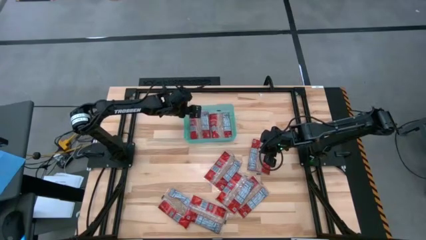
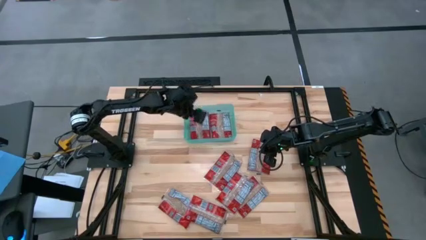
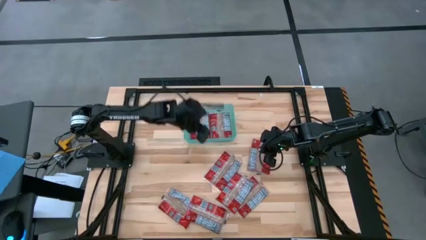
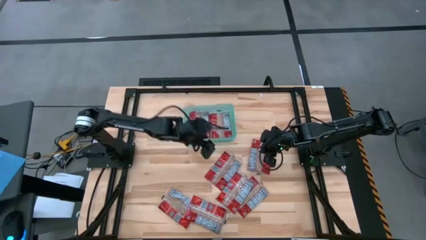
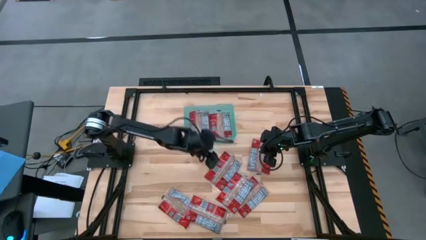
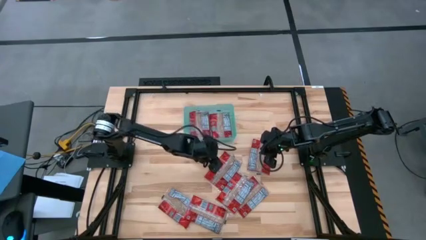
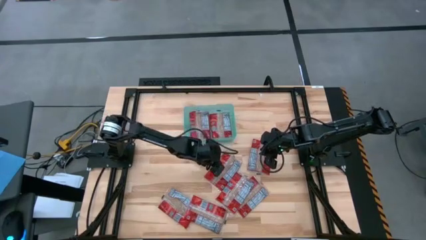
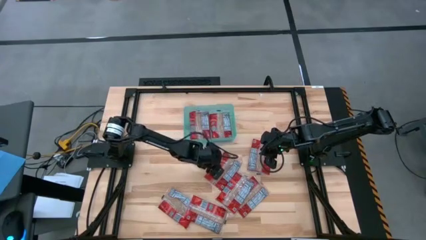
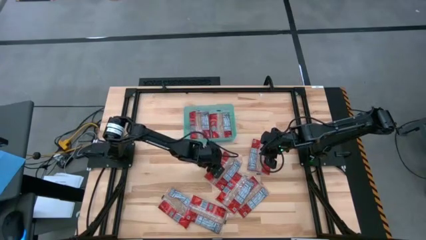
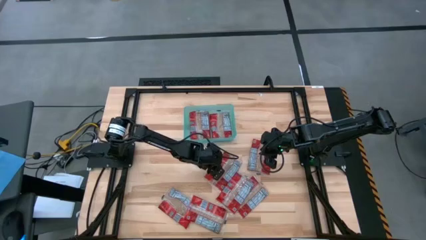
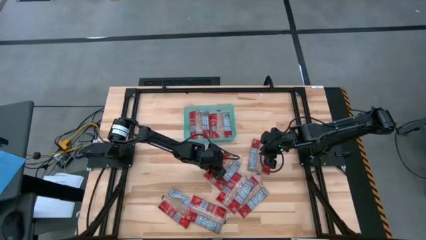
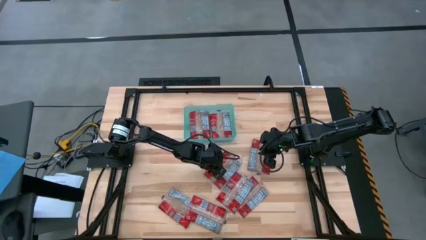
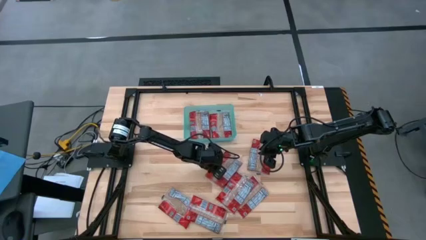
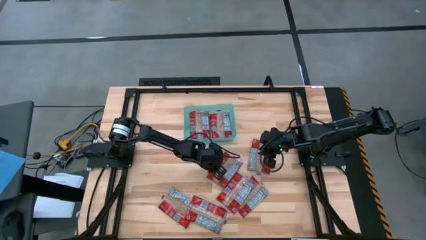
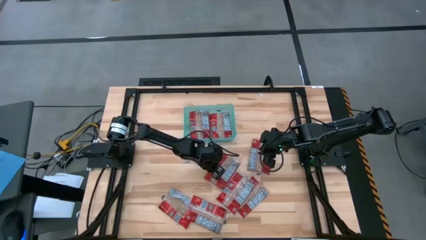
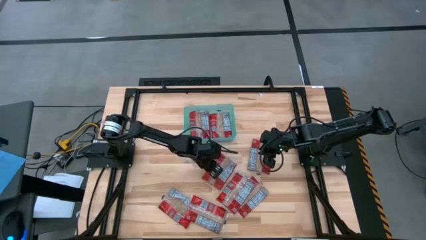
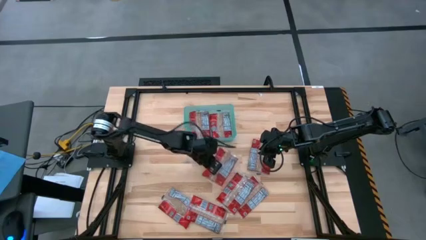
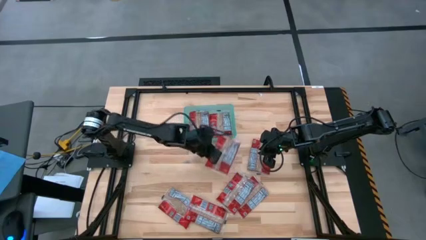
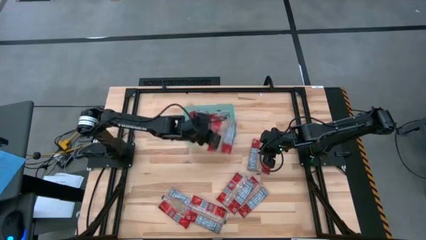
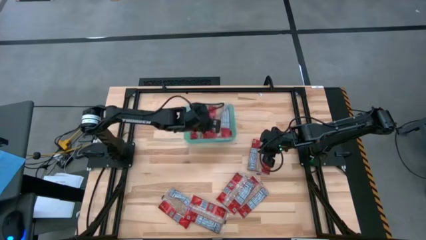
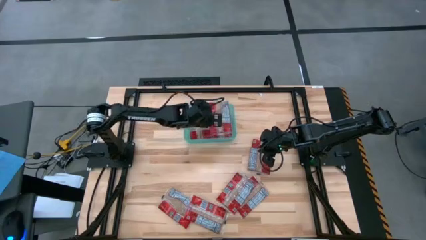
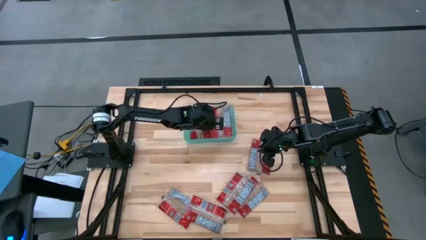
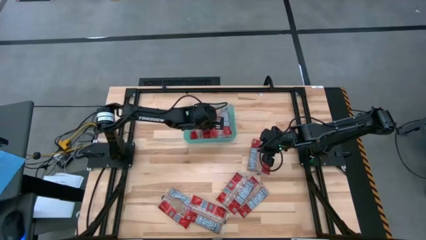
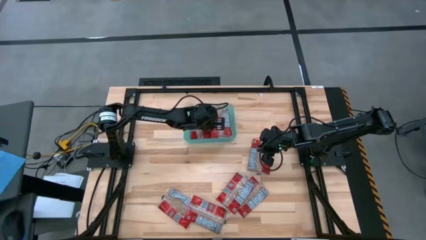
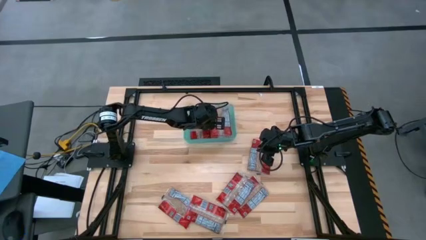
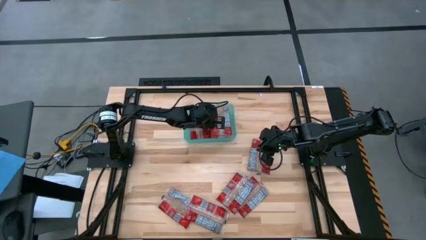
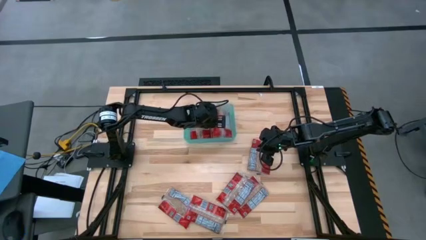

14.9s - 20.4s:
Task: Sort popcorn bags into baskets
Put the red popcorn bag into the blue bin

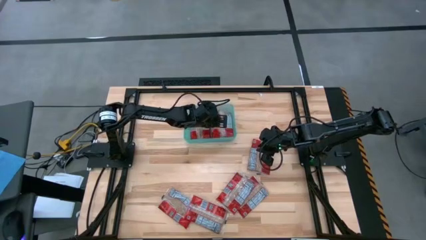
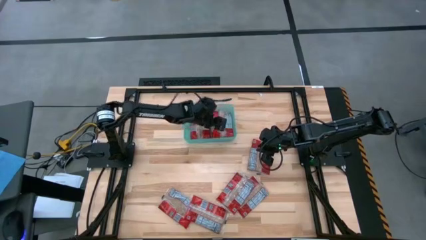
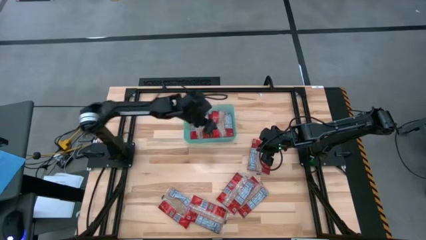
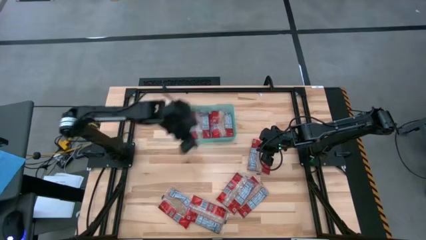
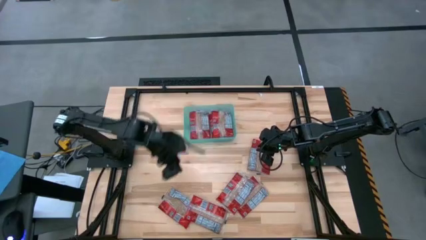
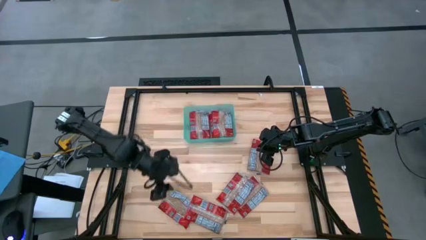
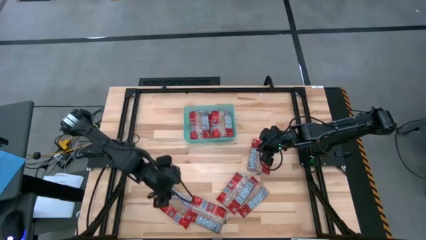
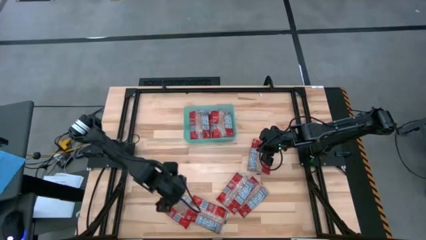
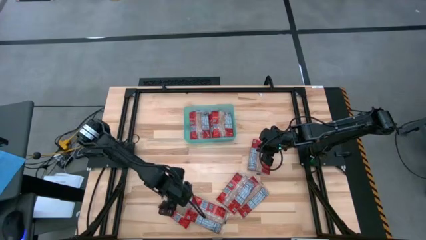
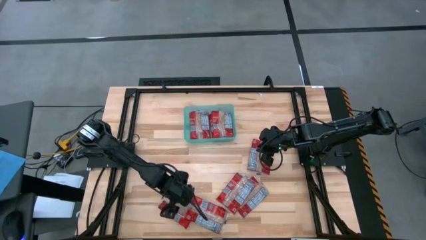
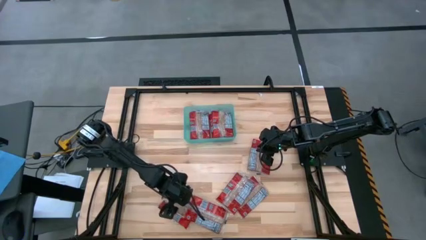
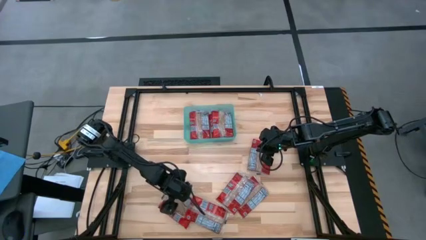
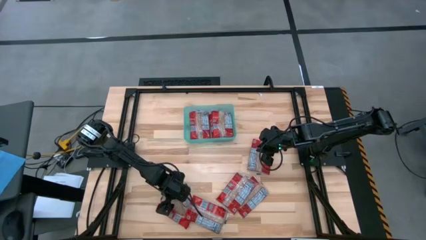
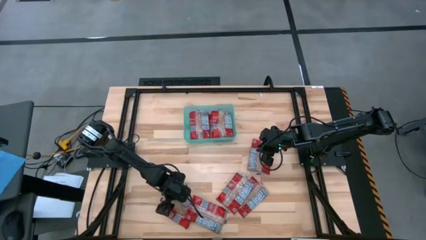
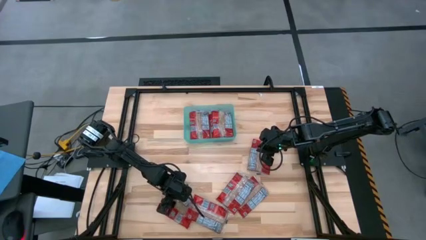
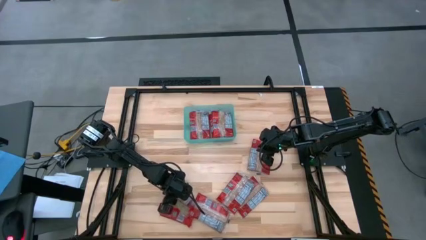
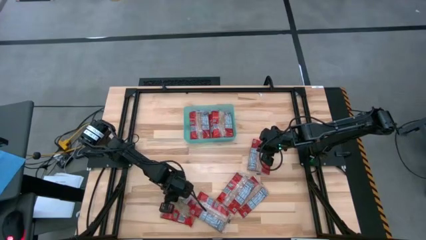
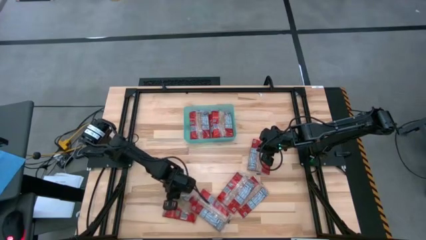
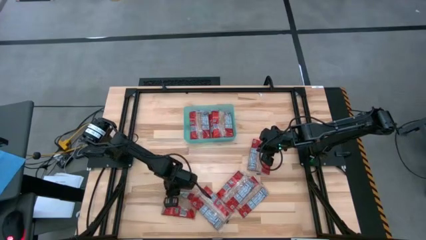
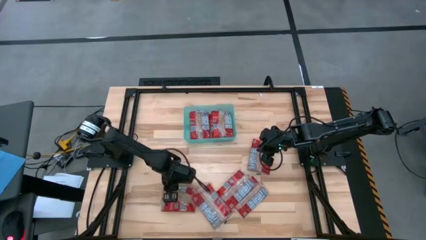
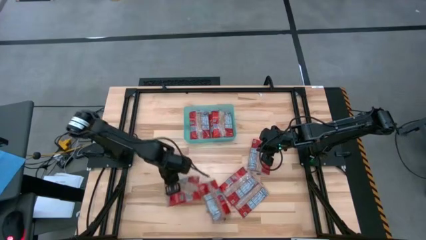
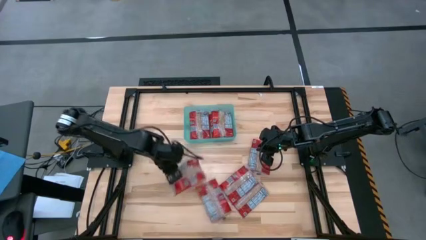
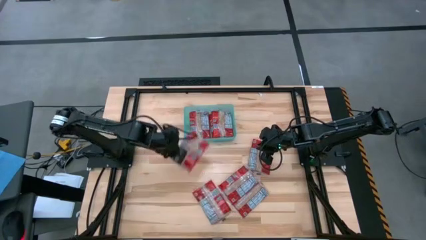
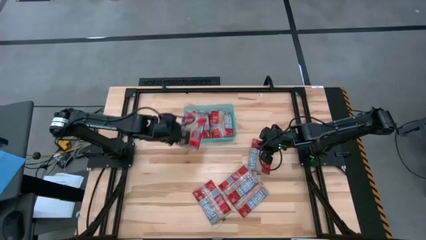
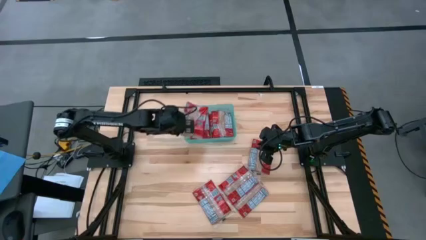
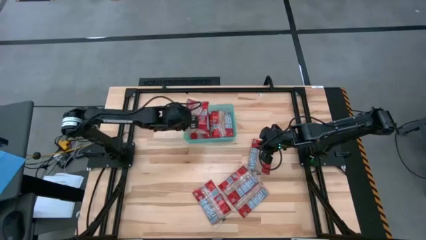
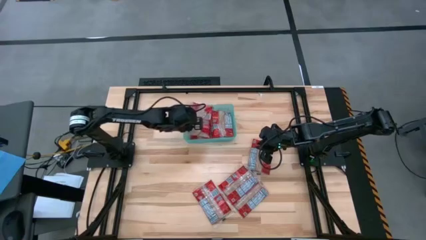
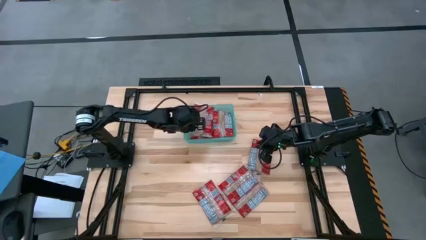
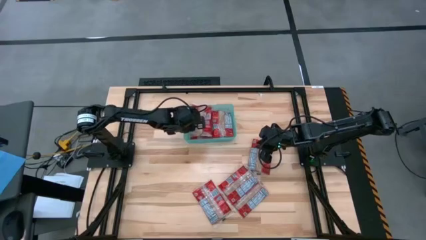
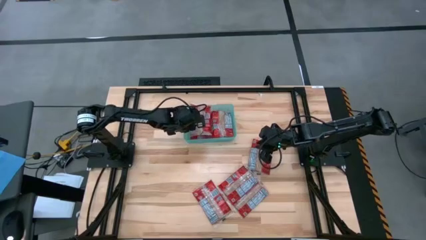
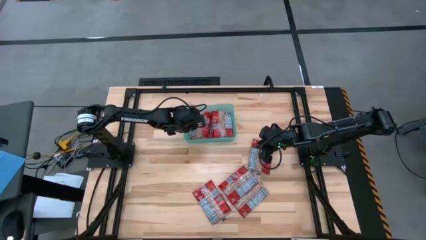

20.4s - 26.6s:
Put the red popcorn bag into the blue bin

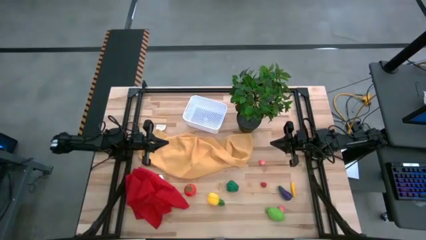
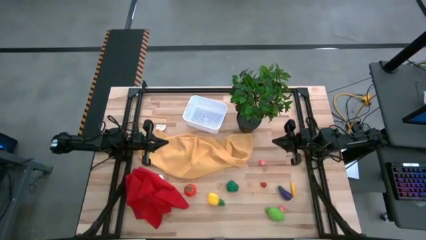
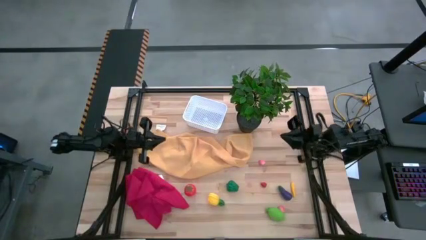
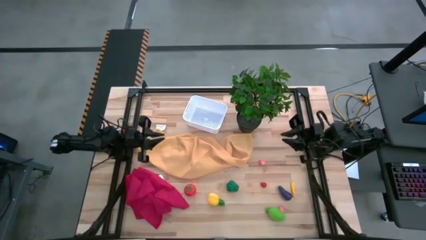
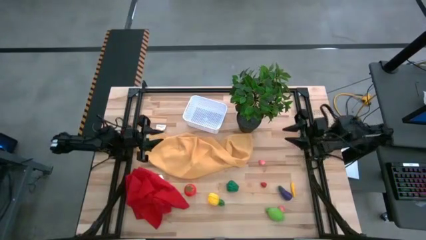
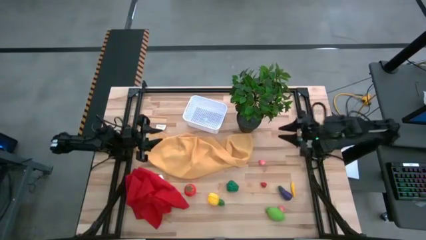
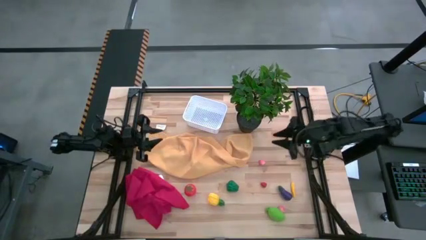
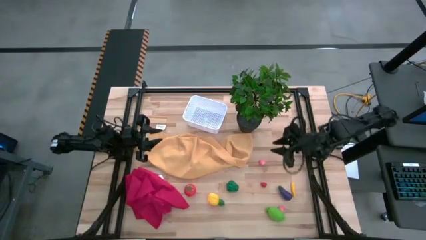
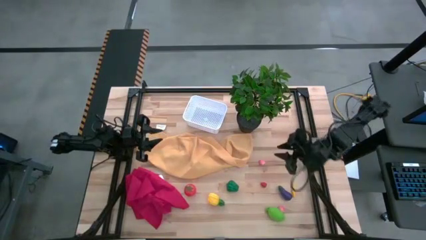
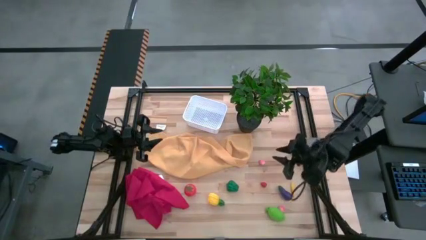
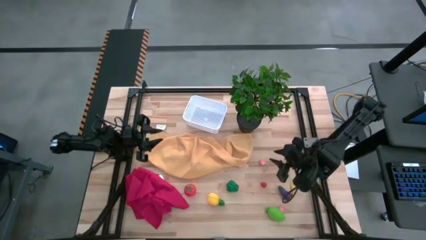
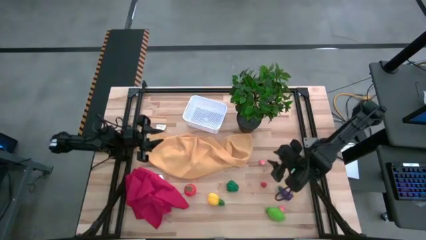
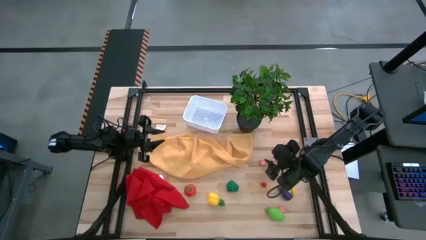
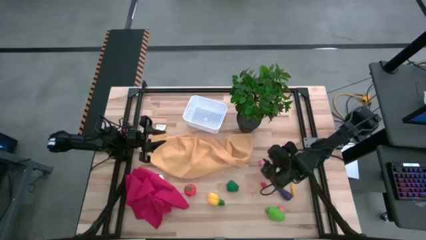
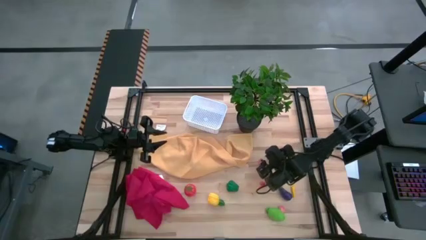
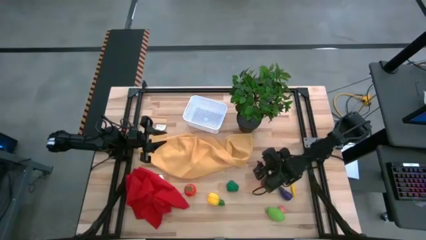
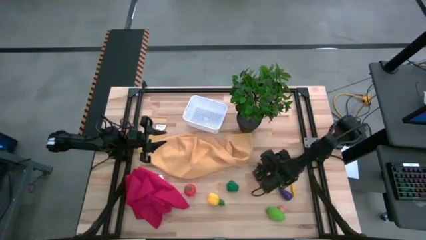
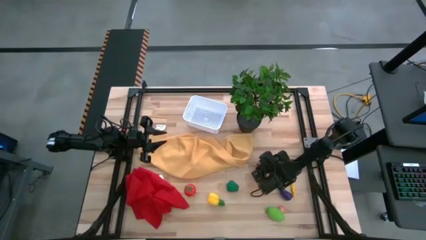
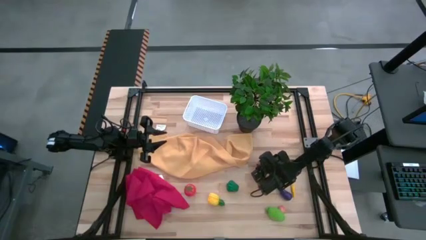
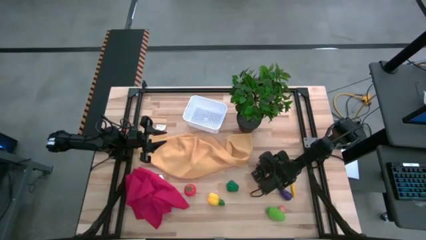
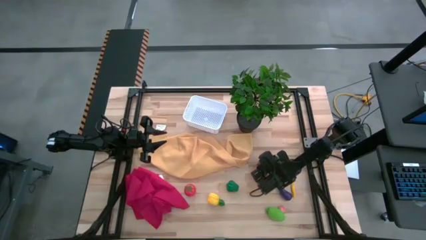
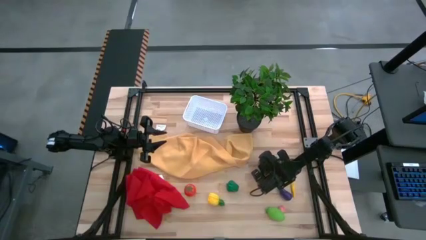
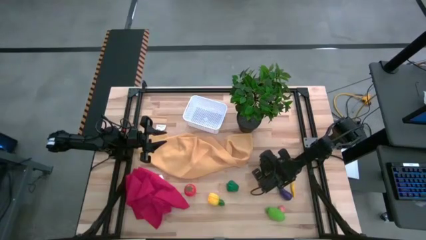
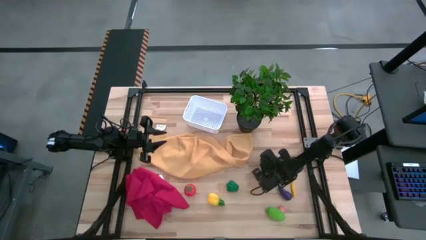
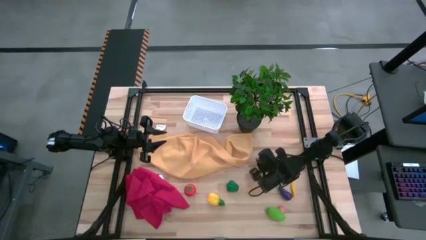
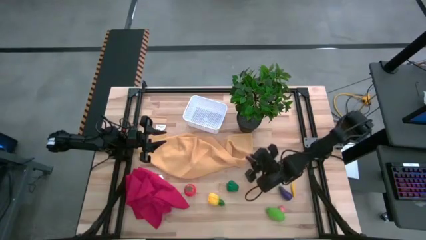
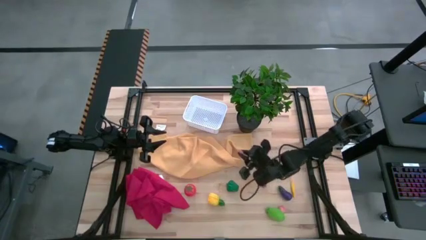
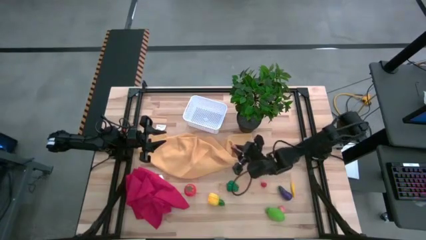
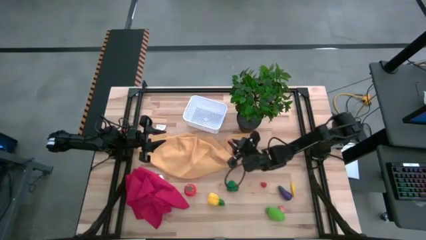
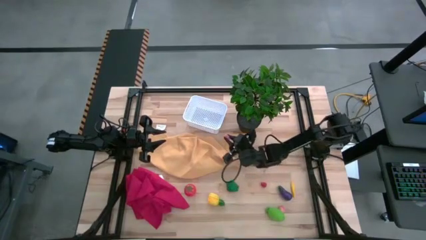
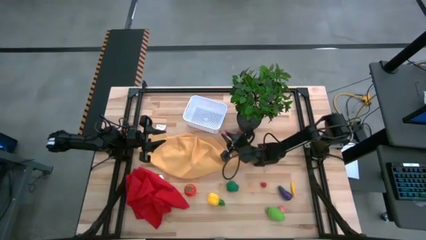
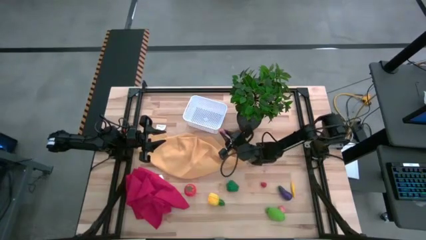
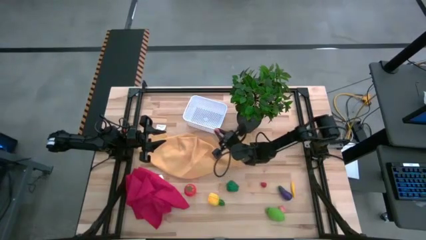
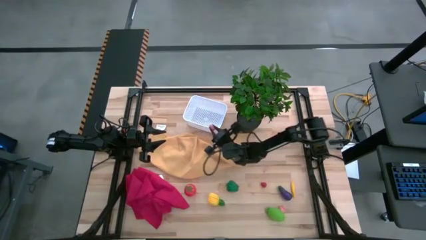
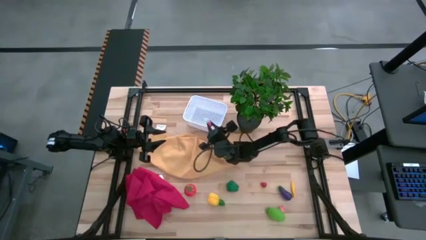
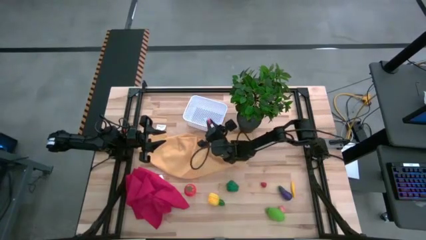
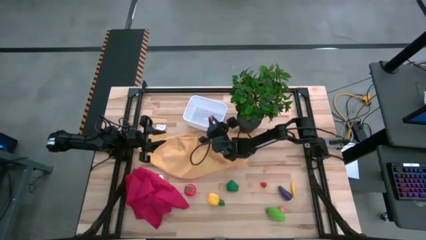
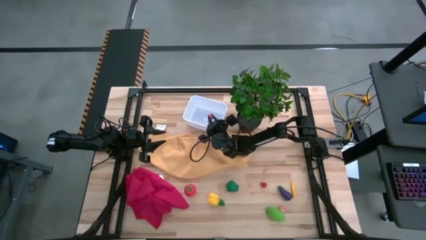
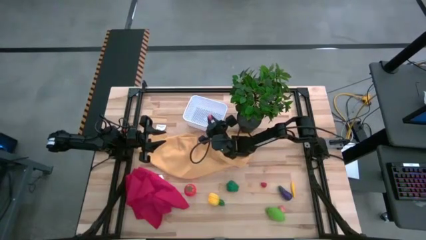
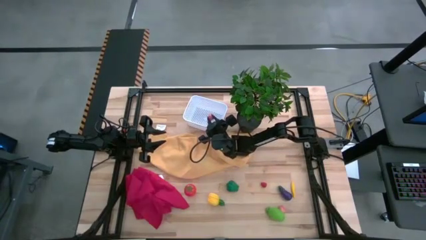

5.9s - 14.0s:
Task: Pick and placing Produce into tupperware
Put the top pink peach into the white bin
